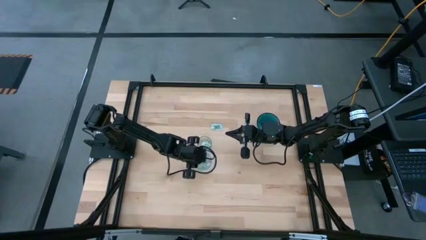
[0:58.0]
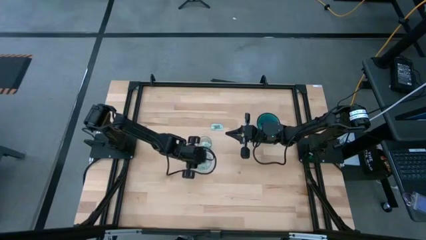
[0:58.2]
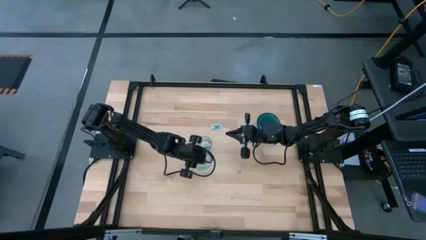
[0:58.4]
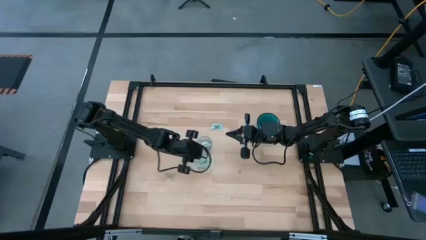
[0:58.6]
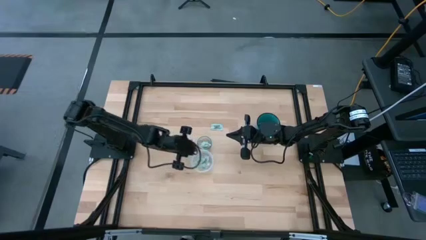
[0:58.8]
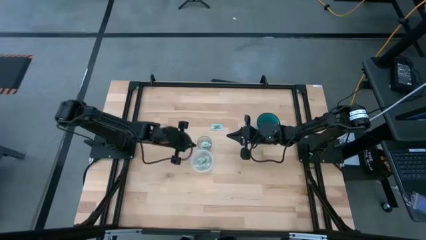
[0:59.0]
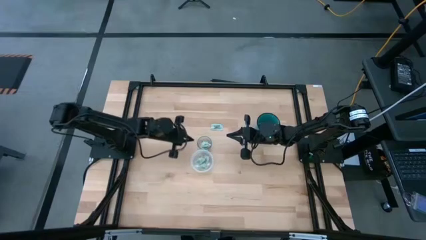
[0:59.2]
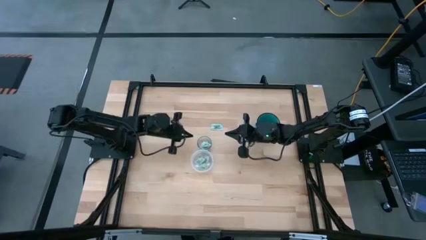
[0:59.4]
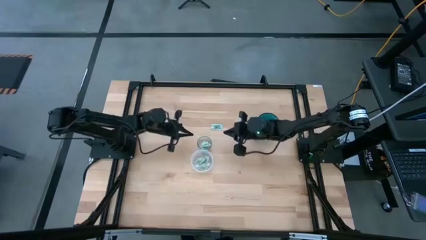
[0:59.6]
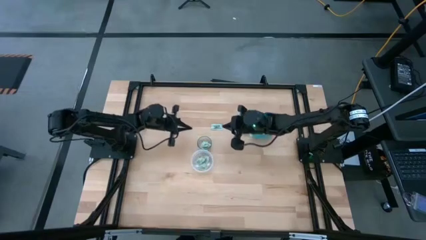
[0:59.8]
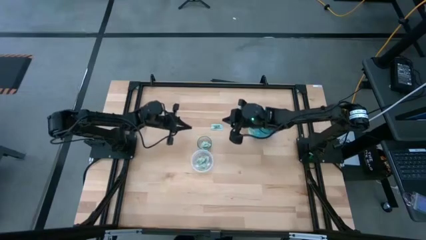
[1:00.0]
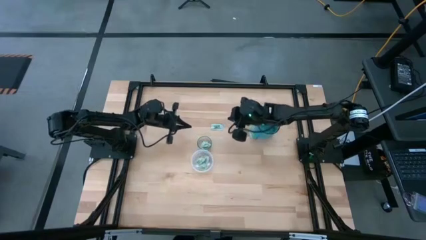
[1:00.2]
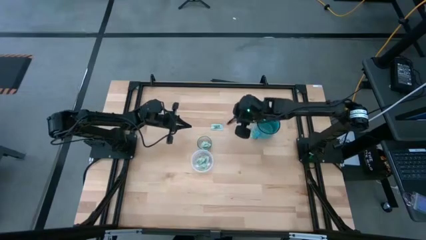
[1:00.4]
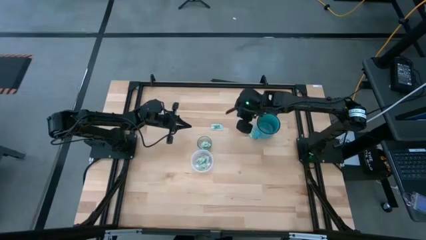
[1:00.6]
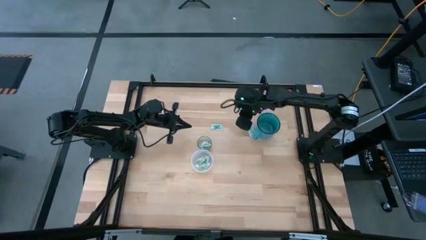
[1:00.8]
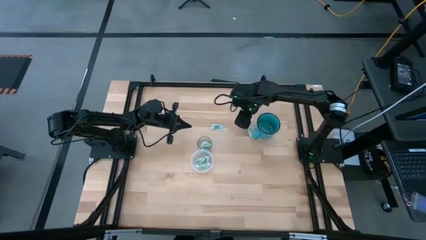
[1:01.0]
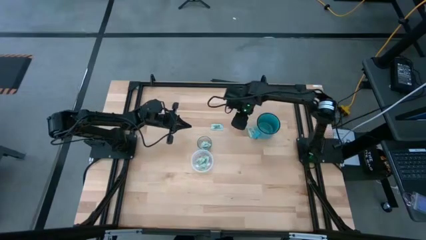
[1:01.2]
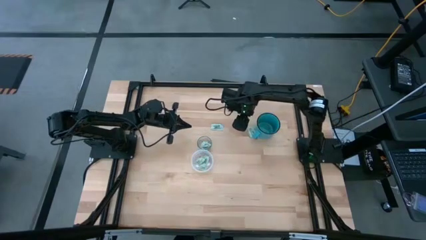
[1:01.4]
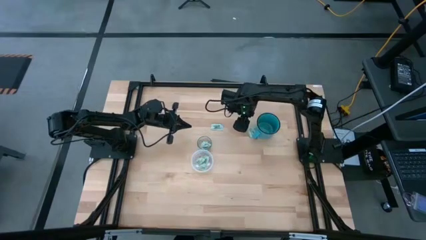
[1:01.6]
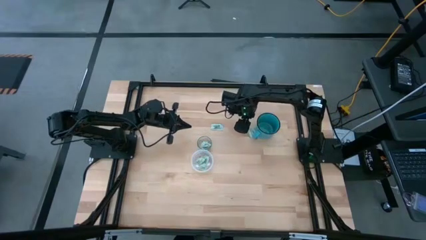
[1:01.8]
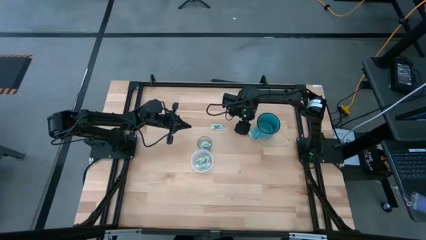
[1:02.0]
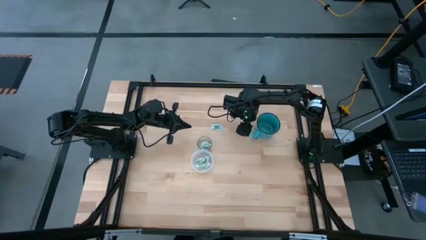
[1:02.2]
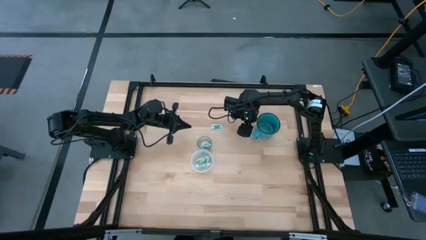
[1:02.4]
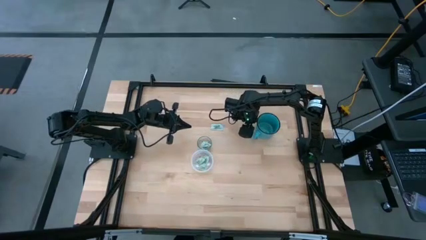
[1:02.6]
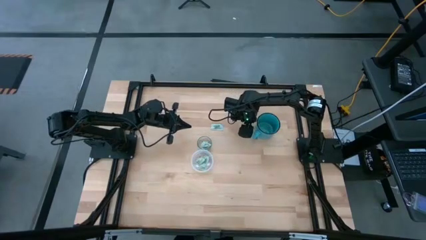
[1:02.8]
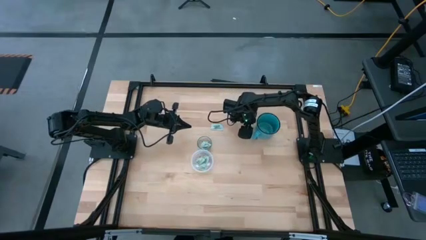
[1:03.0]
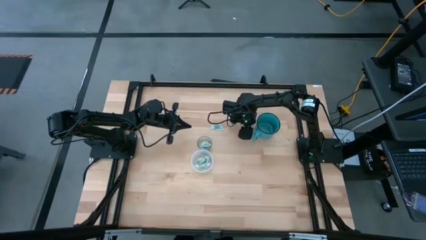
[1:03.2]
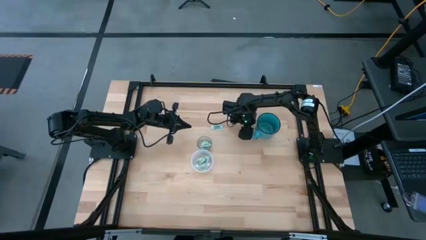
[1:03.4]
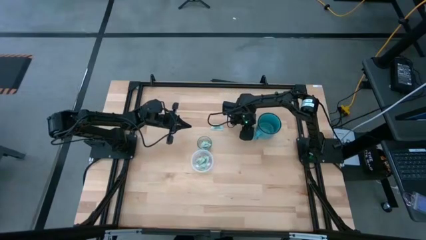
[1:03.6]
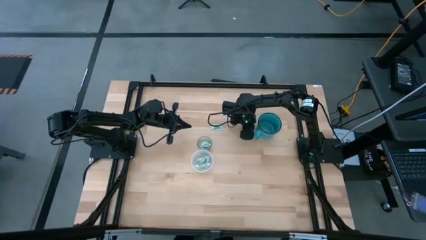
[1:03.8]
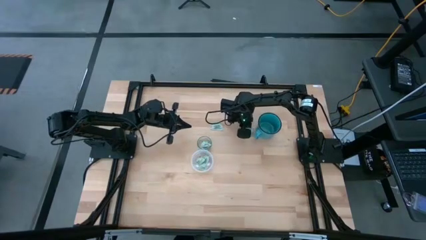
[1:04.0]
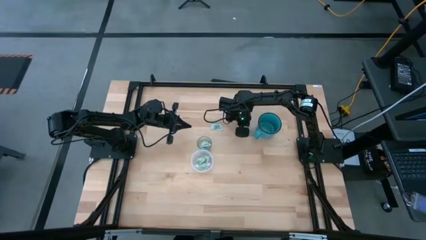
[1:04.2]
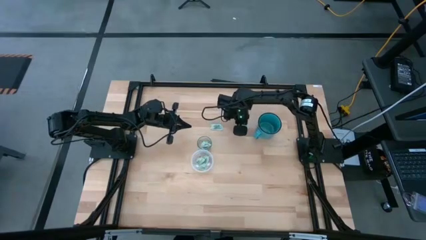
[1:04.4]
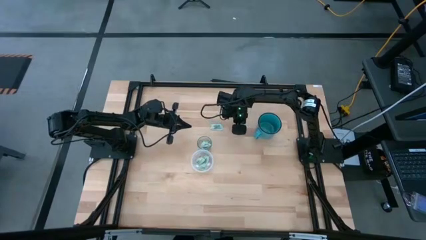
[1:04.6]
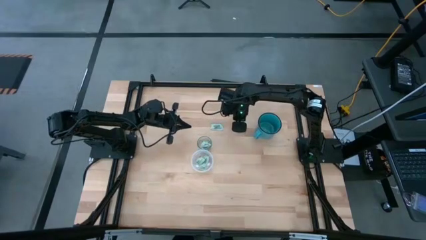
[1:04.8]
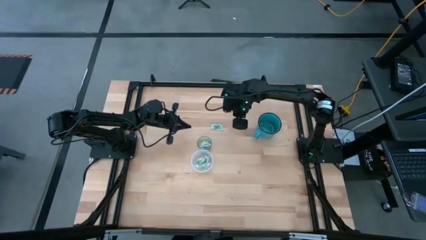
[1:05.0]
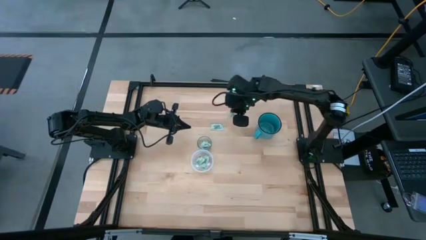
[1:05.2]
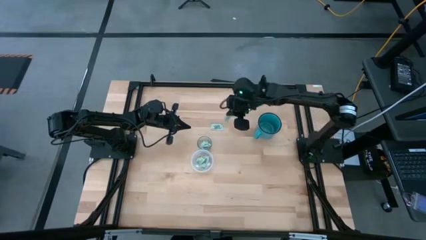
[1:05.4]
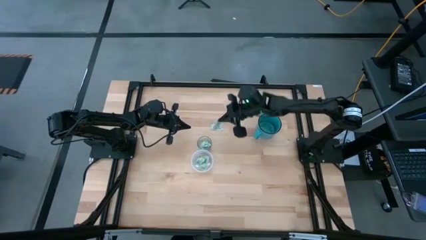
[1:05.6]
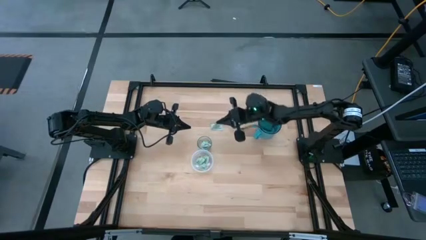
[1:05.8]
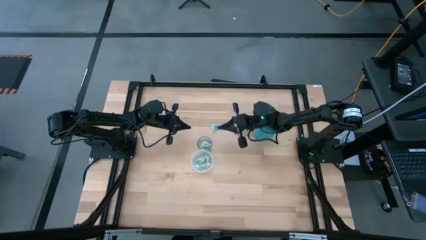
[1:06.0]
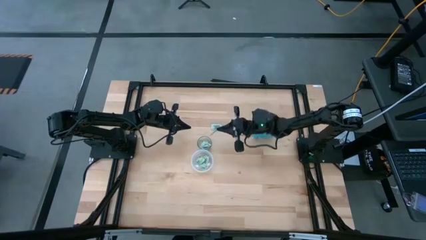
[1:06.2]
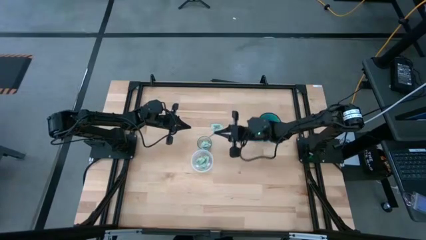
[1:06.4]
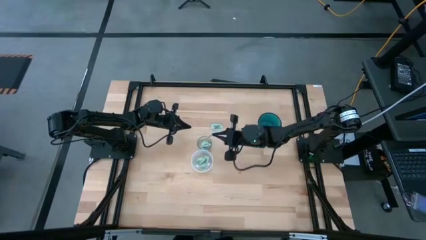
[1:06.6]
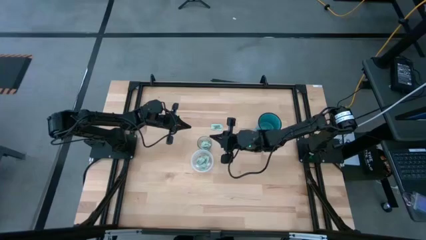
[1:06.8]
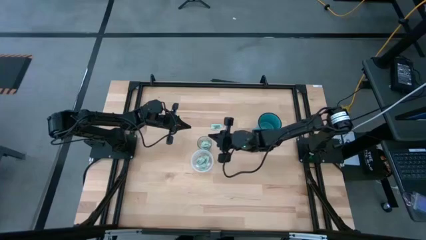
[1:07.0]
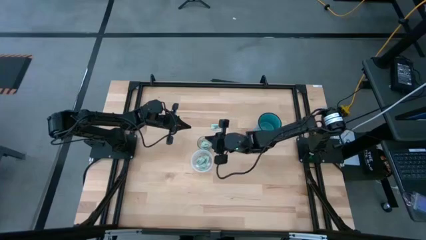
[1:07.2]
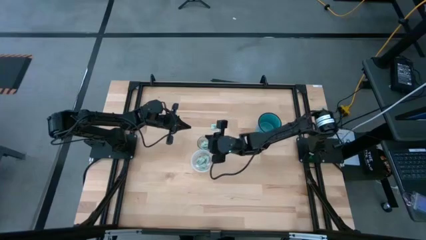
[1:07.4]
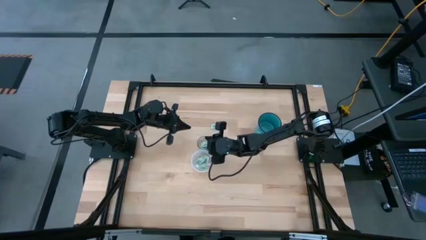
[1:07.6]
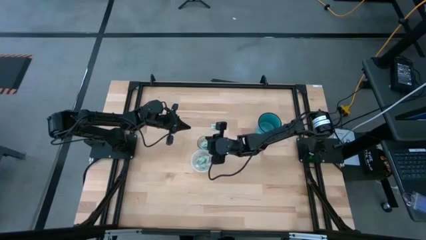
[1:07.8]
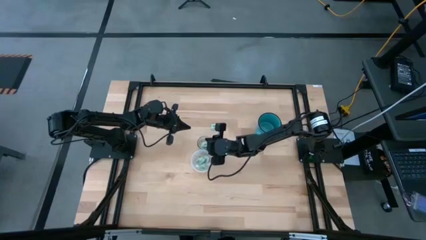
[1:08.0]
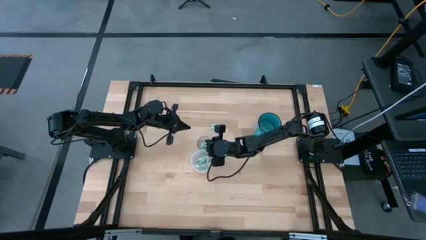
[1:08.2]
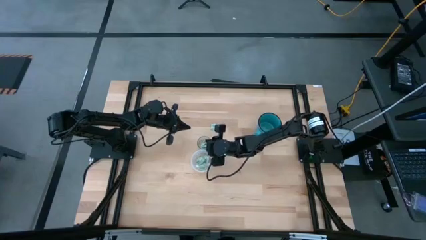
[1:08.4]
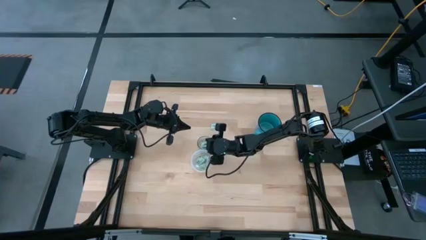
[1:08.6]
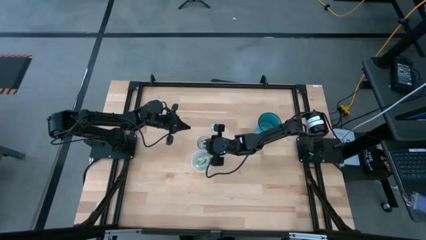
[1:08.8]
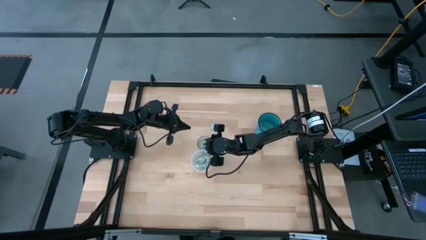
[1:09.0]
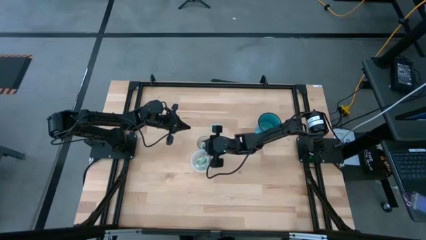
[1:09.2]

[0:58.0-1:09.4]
Task: Pick and place items into bin
Put the transparent stevia packet into the transparent glass bin

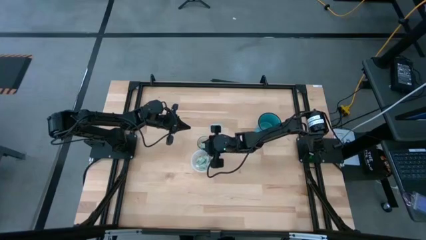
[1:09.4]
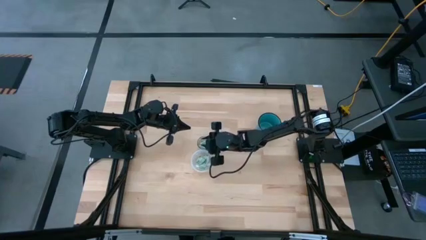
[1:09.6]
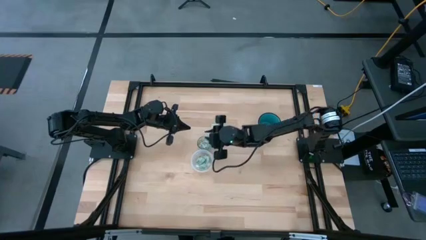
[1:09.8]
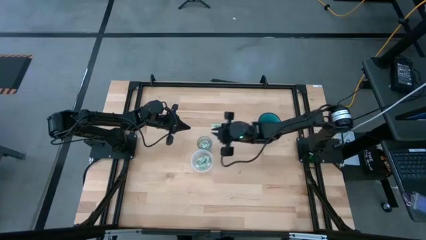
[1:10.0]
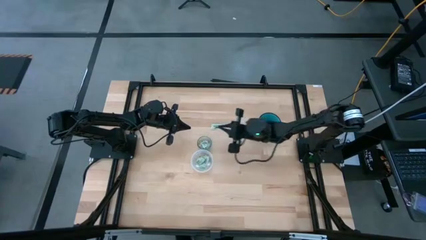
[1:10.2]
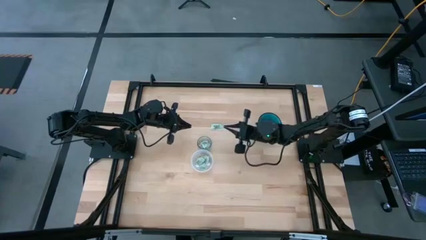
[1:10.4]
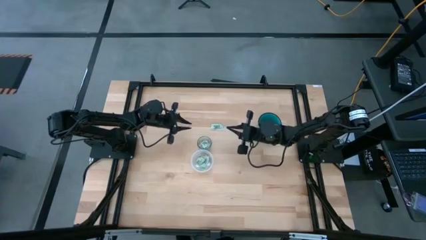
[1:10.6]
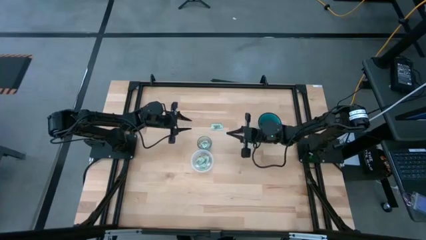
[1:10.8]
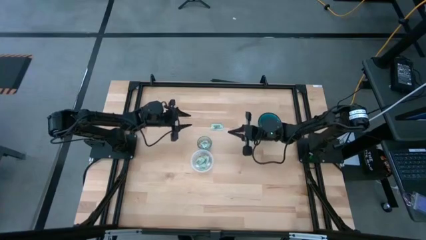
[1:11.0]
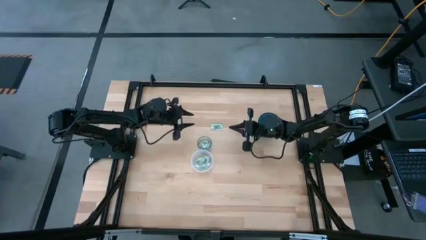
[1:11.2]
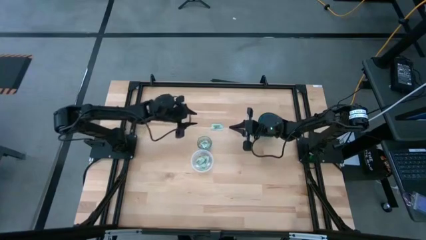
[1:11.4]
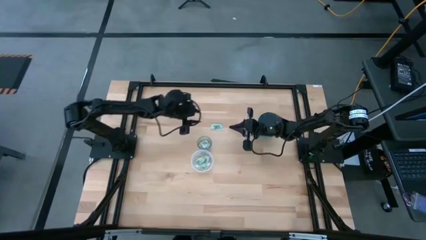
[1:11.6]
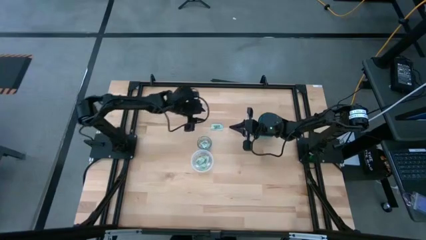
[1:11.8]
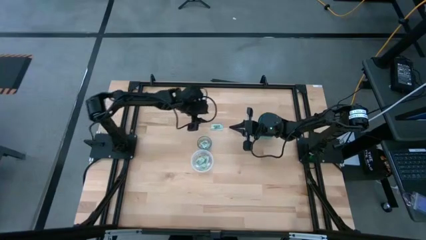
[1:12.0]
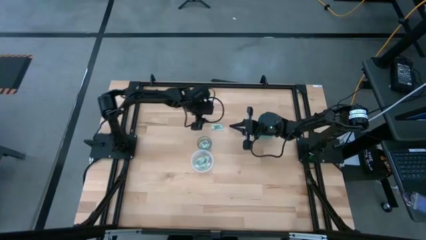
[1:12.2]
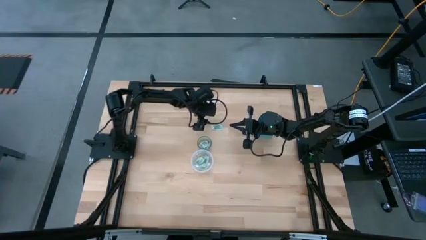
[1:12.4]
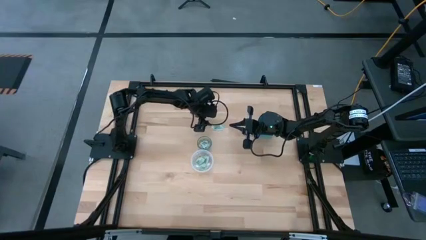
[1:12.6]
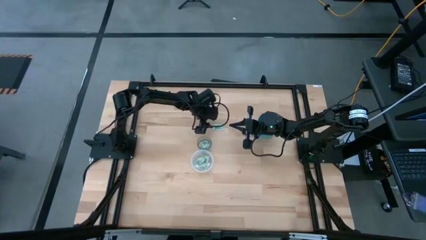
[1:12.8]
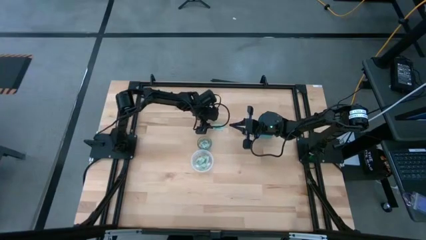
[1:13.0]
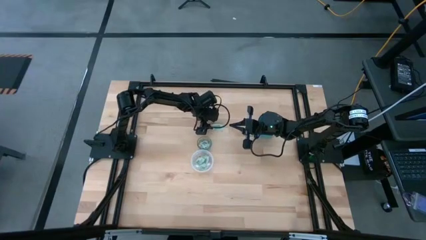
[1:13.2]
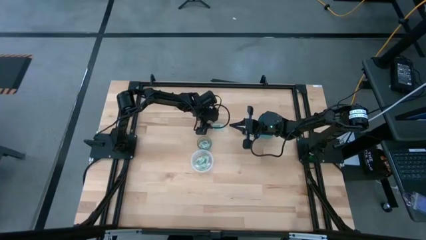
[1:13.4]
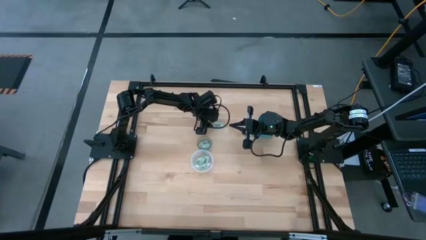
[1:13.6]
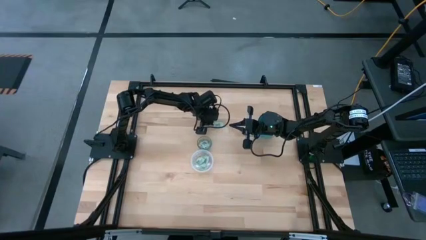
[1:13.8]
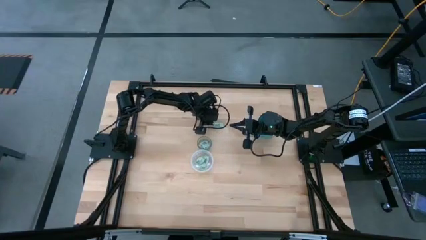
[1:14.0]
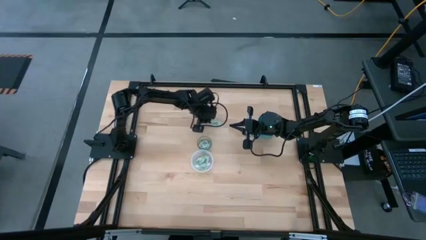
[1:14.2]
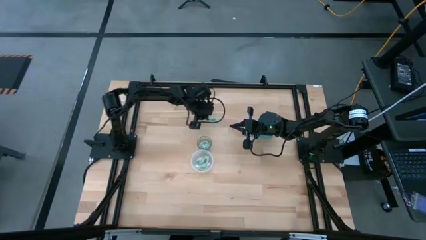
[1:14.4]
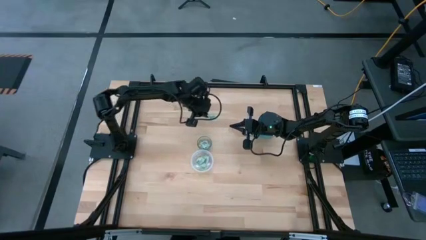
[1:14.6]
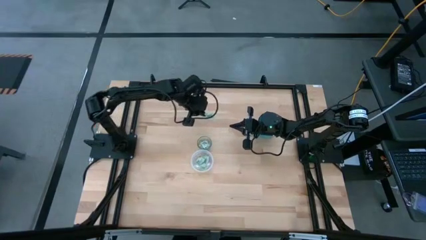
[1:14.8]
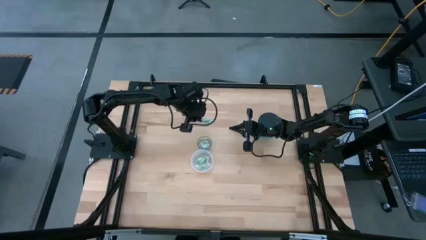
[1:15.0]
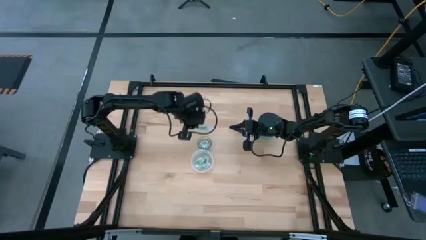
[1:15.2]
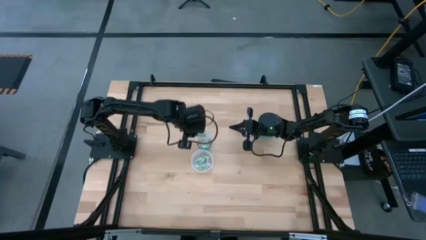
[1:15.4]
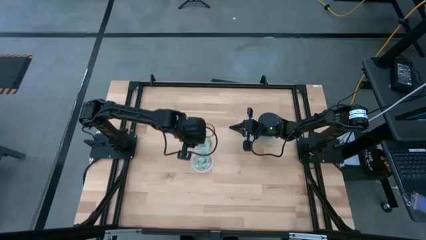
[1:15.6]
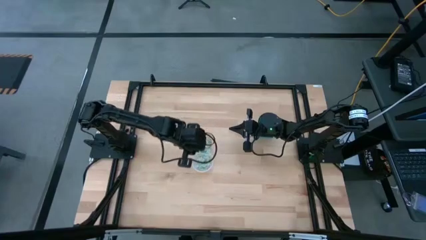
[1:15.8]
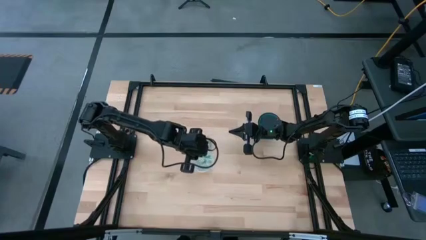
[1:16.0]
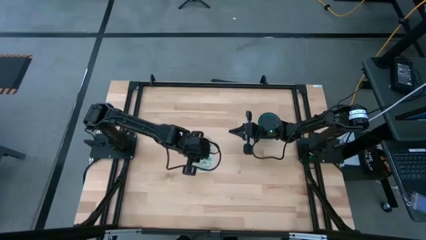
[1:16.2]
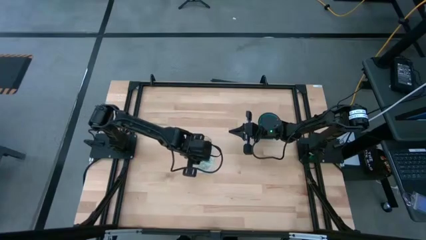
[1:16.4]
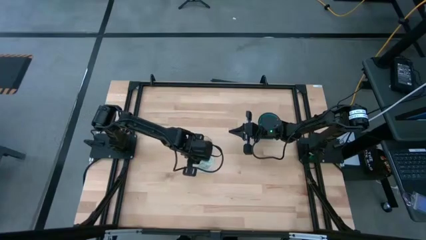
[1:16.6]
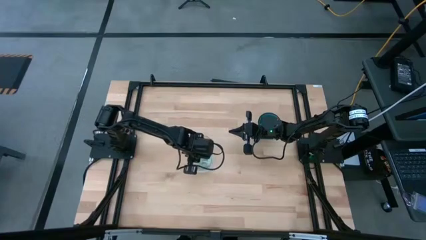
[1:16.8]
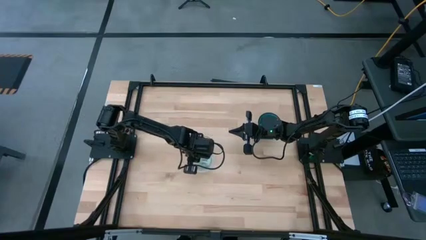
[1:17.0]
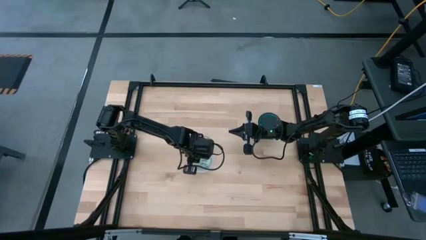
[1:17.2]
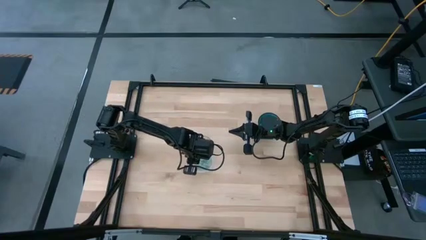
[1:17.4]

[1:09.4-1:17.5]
Put the transparent stevia packet into the transparent bin
